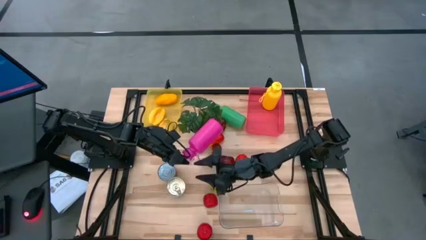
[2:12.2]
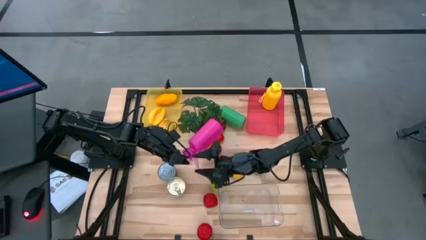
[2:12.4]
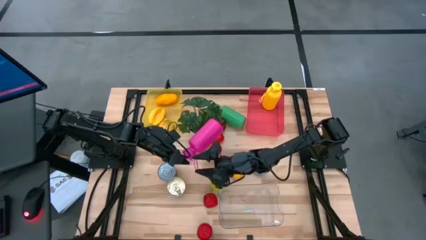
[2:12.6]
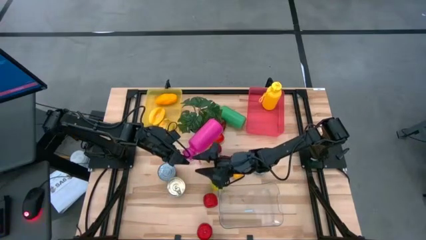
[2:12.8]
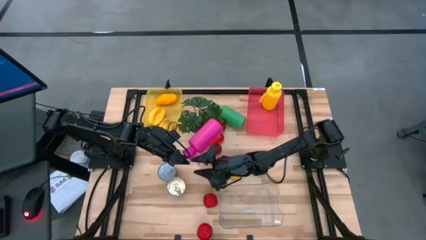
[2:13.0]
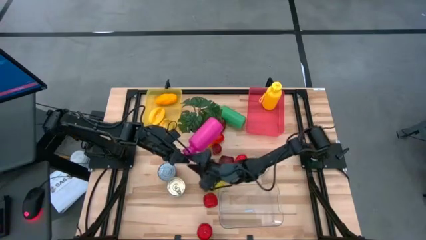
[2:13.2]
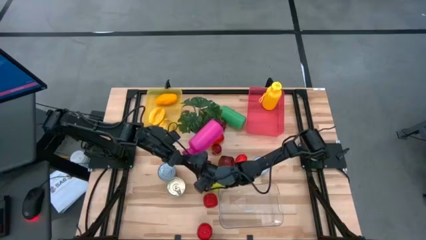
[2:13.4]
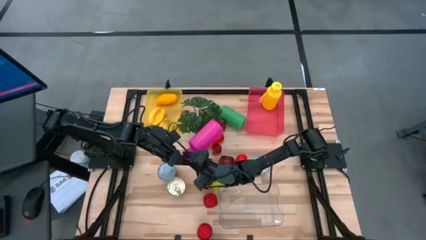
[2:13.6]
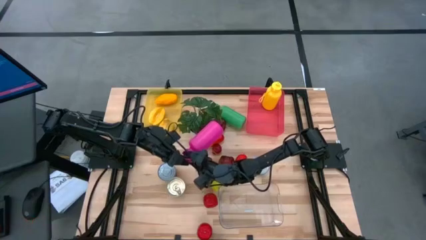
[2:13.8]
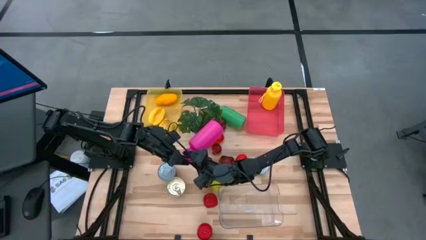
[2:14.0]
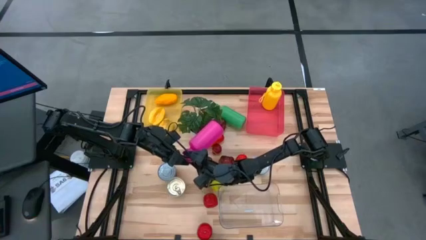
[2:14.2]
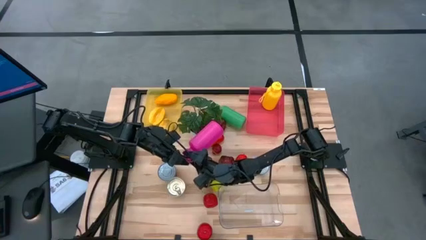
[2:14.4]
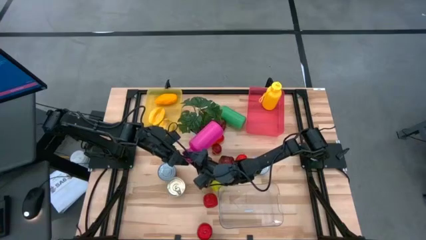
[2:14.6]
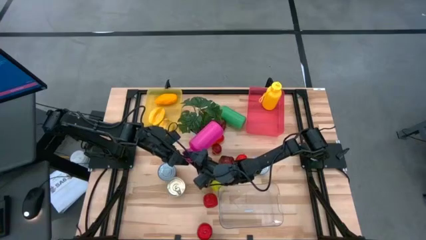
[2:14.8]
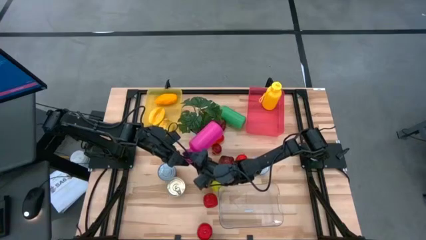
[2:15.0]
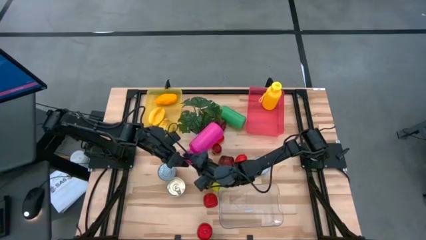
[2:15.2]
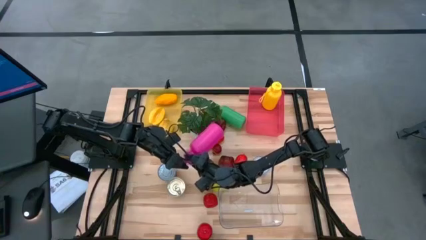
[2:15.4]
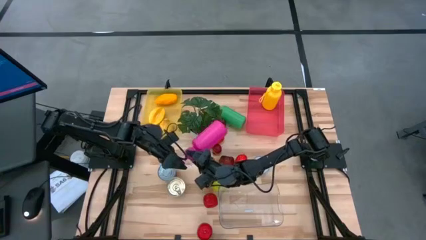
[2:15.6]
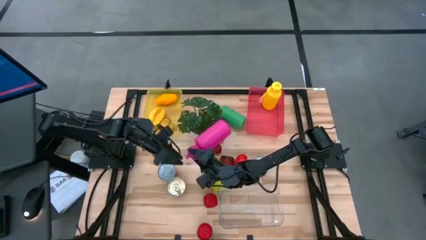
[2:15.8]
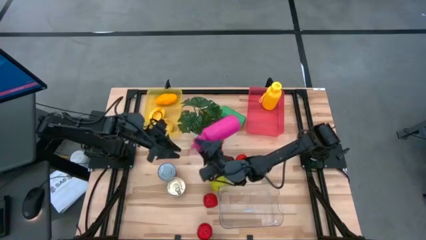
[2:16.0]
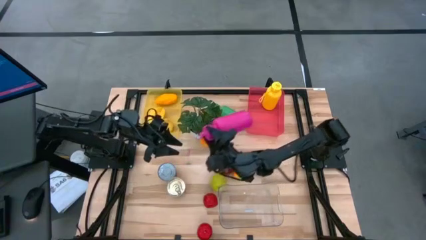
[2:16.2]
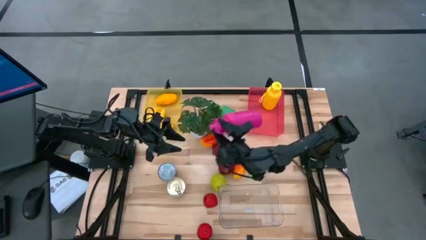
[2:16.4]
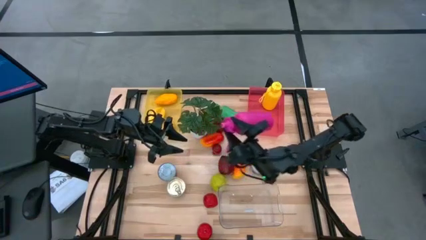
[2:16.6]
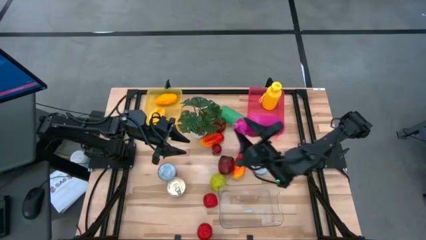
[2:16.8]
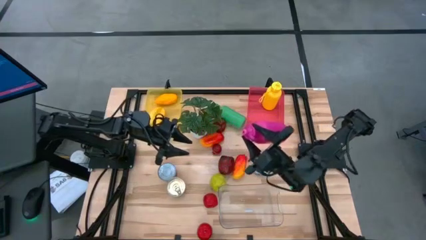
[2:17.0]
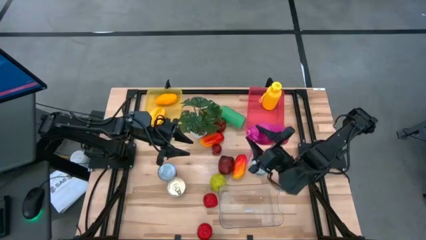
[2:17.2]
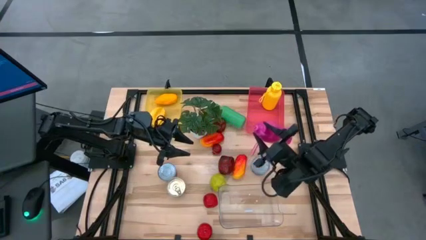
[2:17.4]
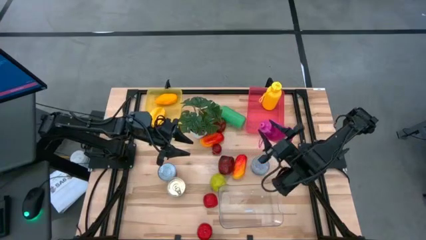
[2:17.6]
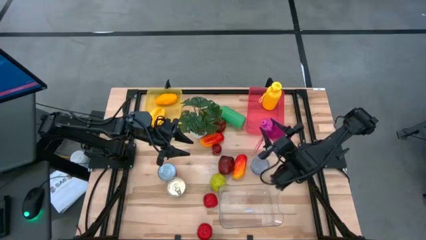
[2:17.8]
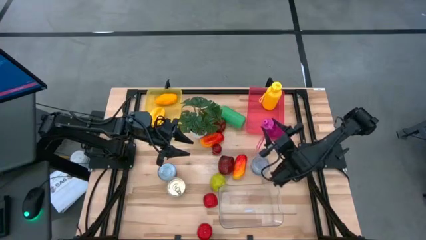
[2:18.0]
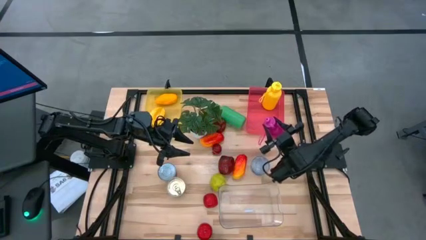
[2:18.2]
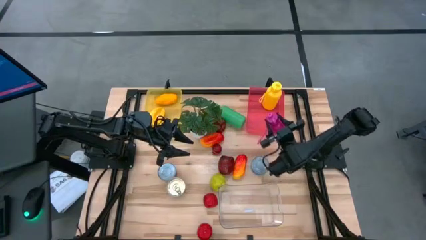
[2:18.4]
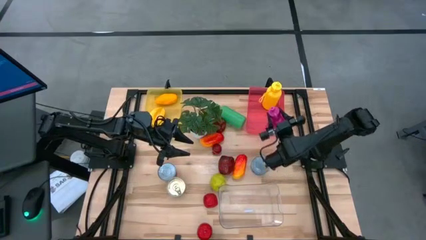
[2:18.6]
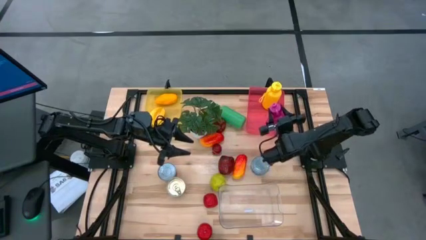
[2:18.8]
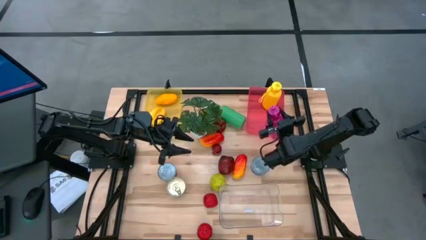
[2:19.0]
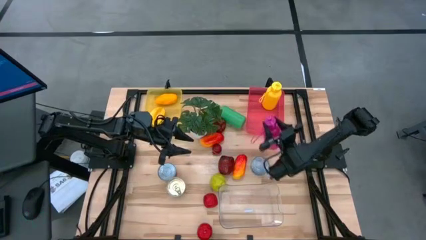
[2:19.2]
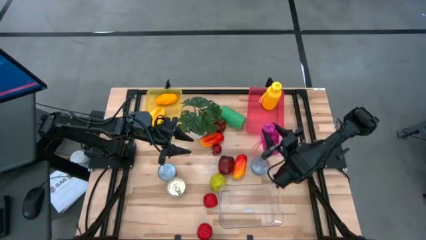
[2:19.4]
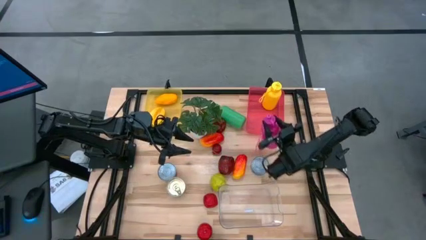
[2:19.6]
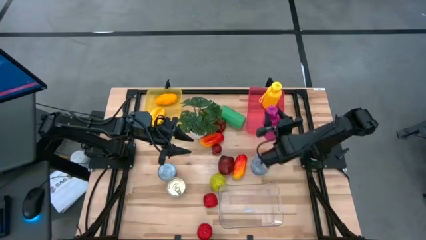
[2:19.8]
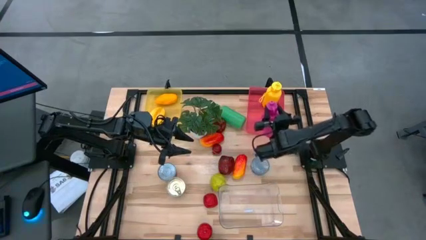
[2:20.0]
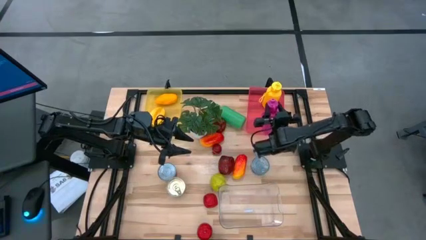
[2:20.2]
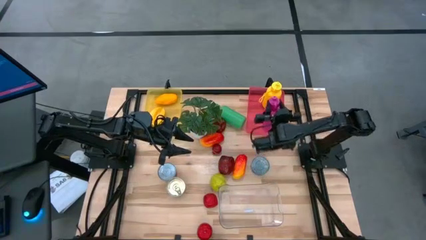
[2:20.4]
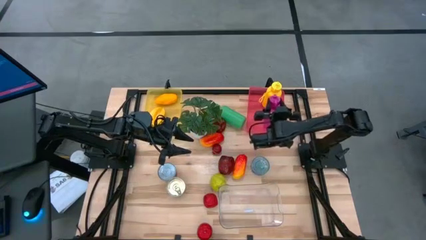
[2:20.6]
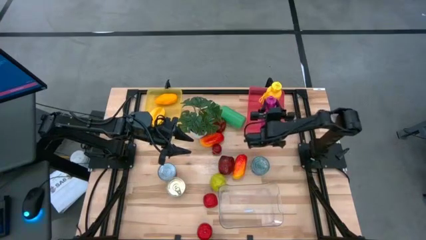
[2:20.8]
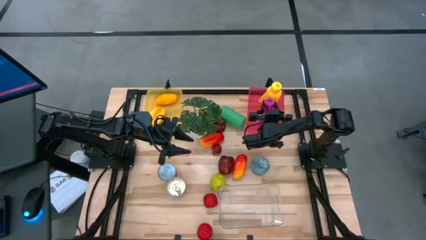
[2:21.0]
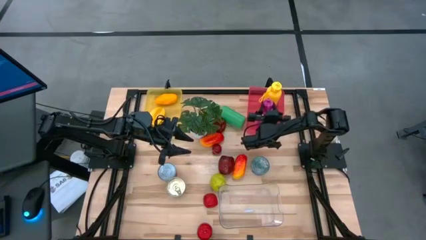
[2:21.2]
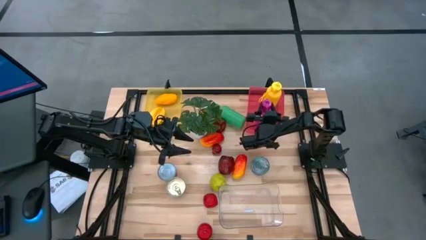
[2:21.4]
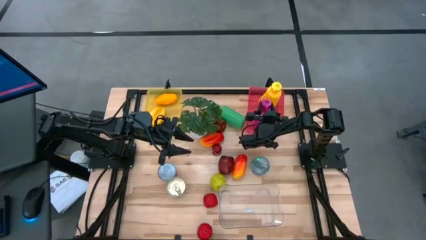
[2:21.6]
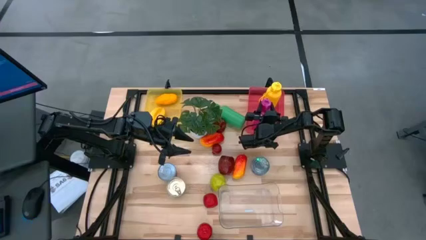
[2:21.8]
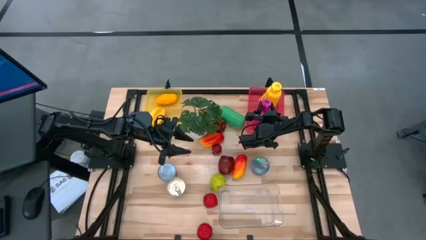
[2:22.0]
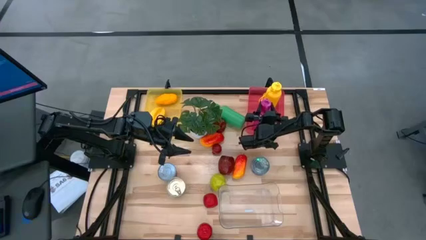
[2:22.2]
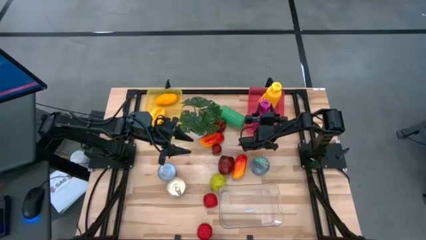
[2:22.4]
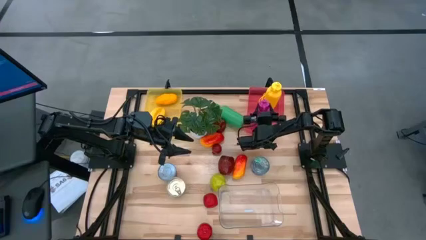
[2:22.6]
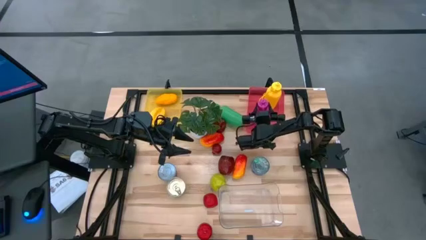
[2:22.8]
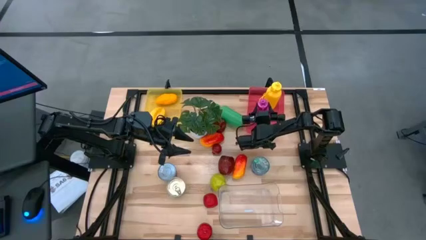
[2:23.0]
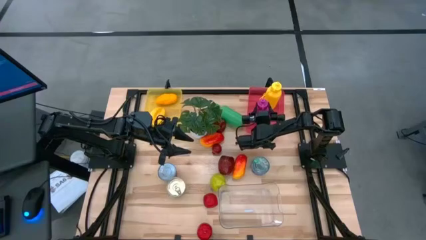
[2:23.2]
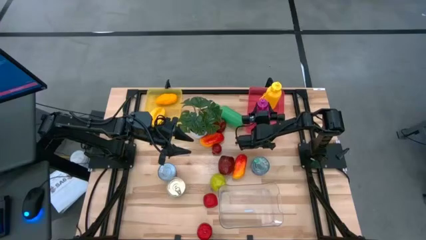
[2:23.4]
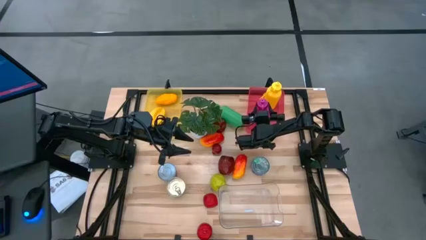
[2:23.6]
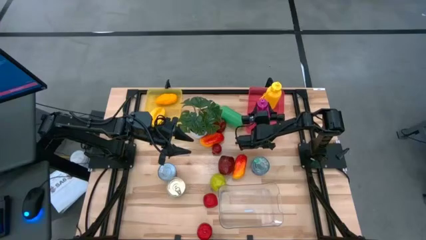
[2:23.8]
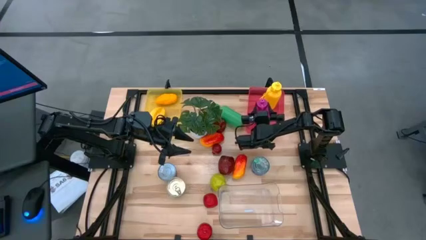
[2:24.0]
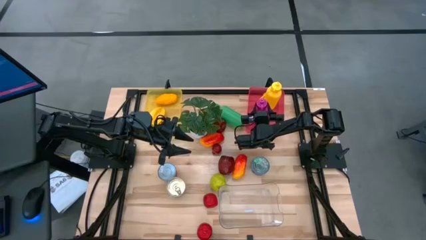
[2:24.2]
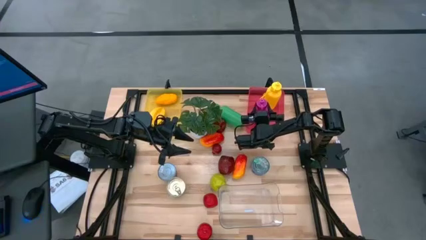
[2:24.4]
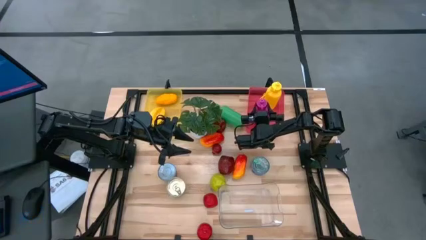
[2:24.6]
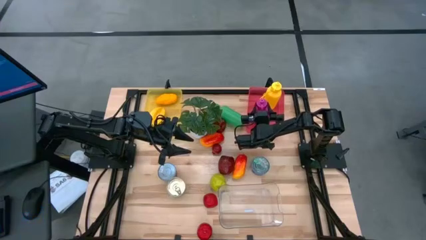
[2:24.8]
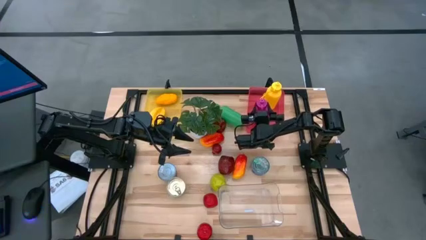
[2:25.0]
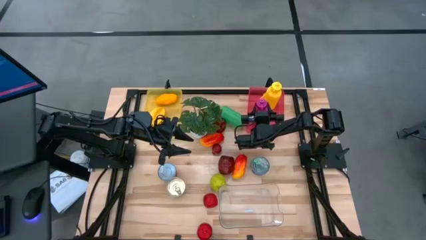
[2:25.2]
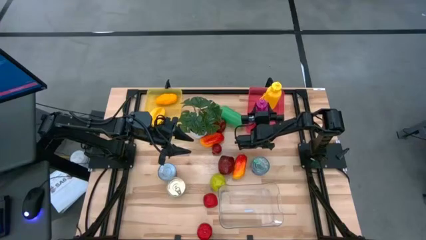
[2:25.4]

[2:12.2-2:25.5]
Task: Pick & Place Food Item
Put the pink water bottle into the pink bin
